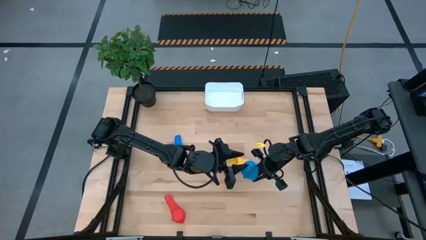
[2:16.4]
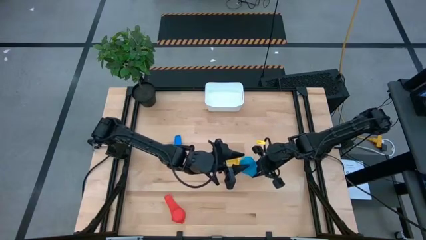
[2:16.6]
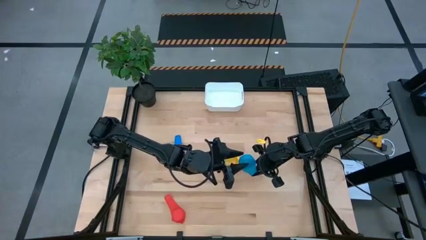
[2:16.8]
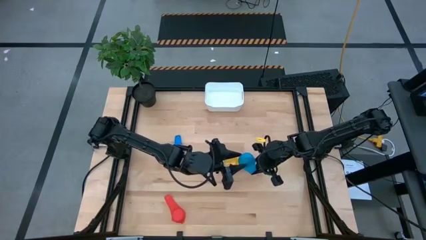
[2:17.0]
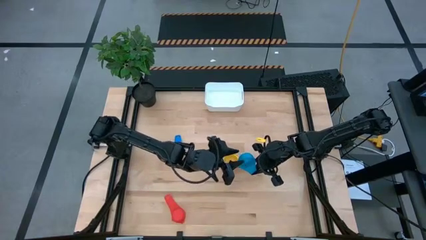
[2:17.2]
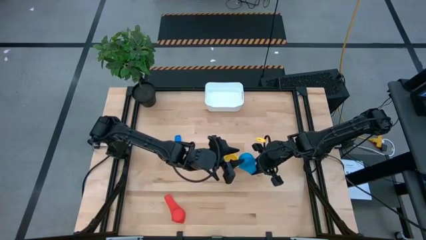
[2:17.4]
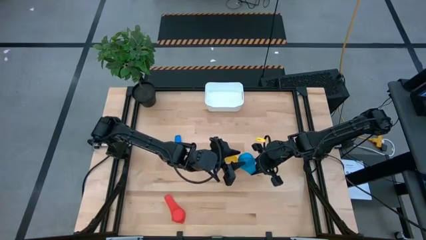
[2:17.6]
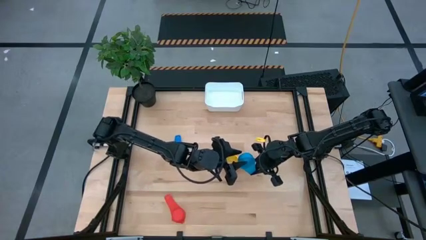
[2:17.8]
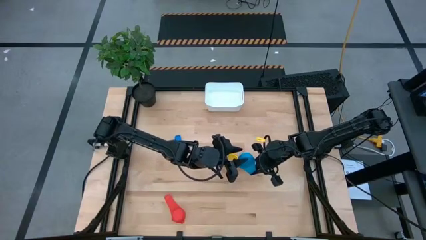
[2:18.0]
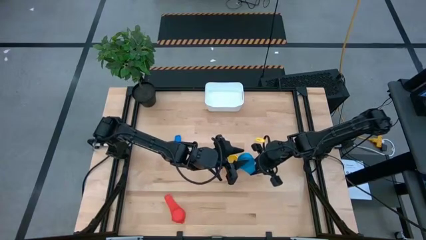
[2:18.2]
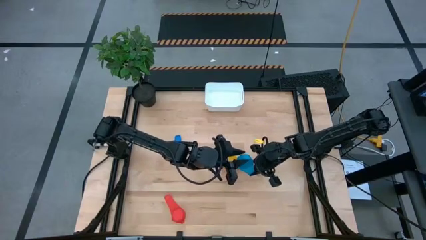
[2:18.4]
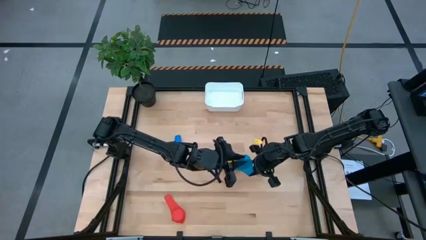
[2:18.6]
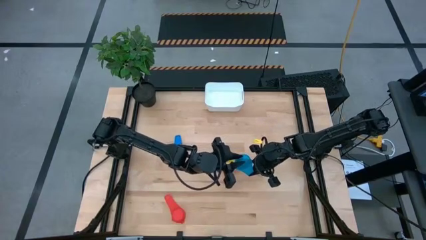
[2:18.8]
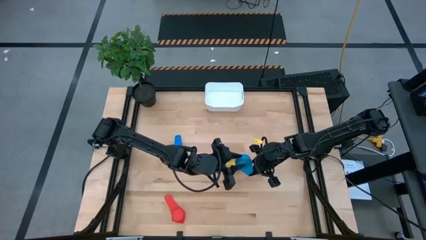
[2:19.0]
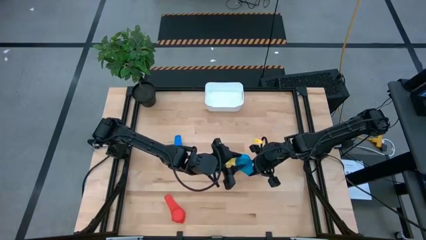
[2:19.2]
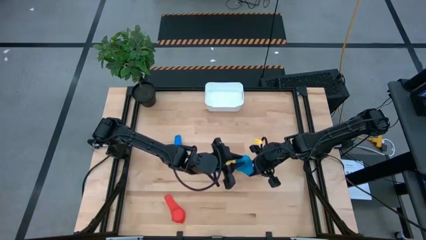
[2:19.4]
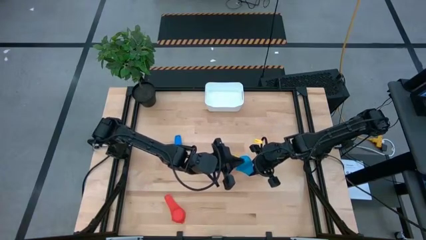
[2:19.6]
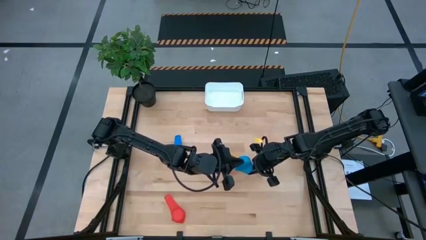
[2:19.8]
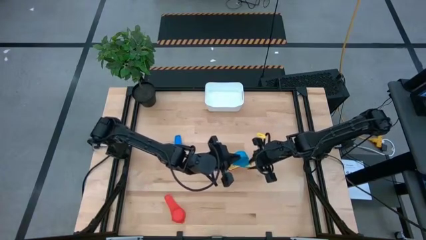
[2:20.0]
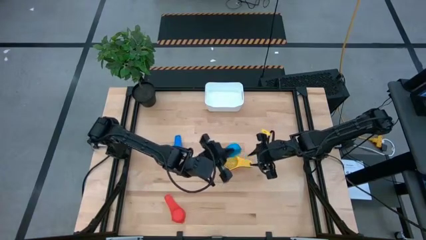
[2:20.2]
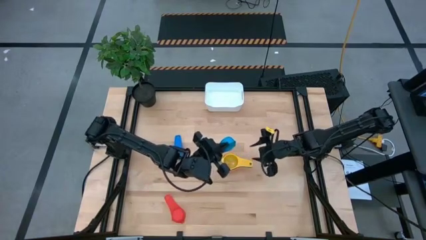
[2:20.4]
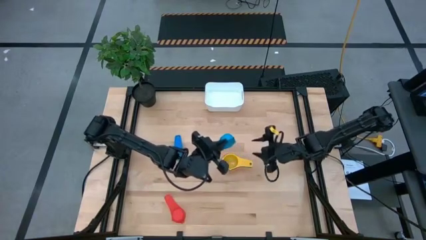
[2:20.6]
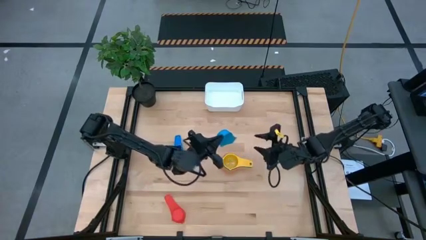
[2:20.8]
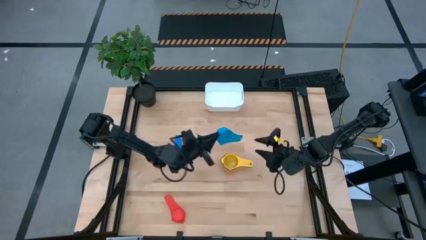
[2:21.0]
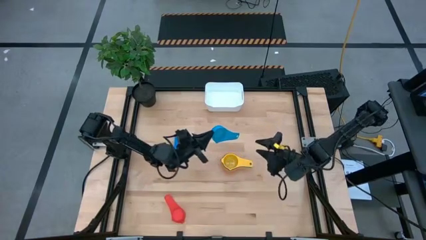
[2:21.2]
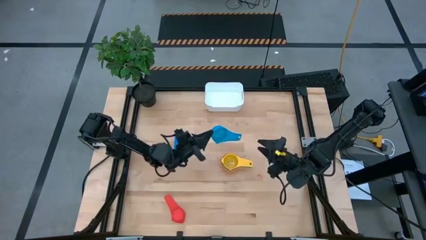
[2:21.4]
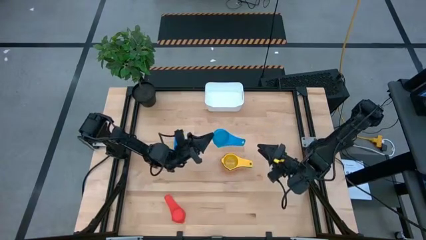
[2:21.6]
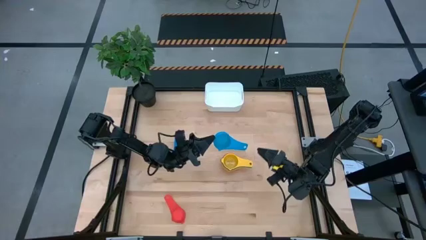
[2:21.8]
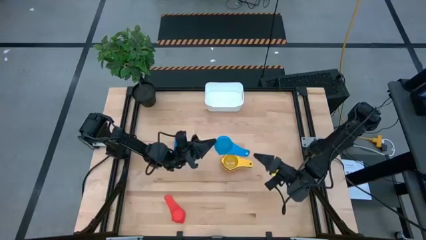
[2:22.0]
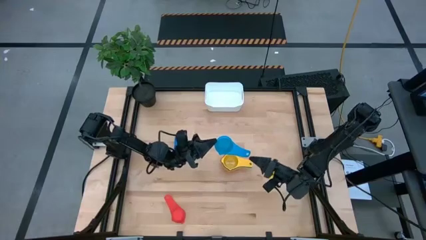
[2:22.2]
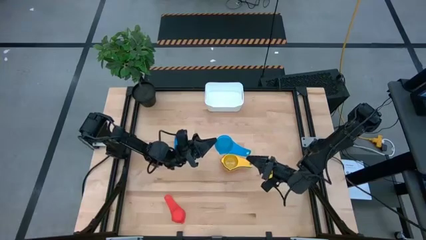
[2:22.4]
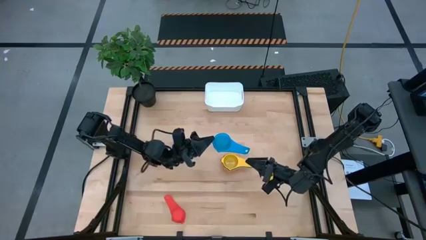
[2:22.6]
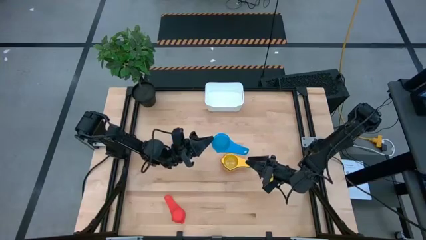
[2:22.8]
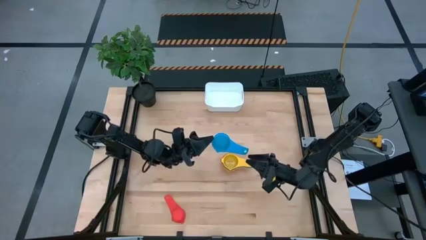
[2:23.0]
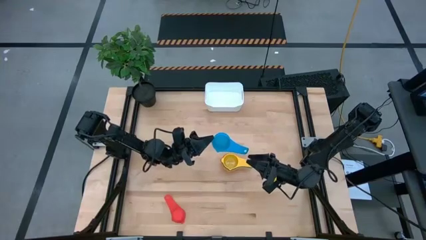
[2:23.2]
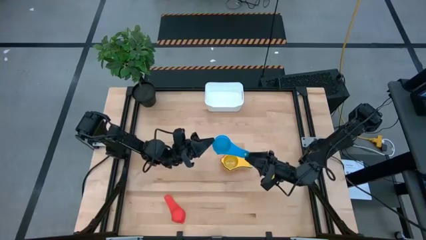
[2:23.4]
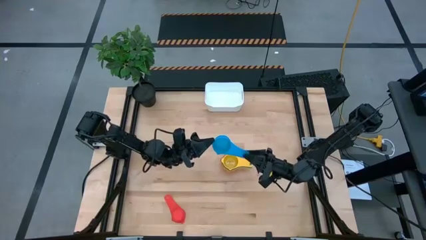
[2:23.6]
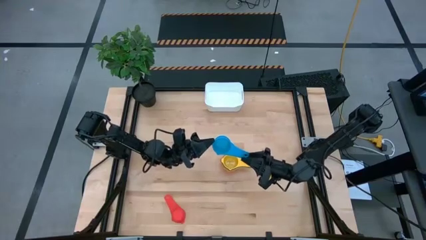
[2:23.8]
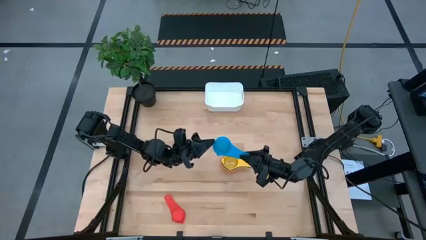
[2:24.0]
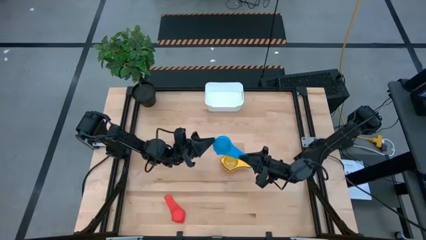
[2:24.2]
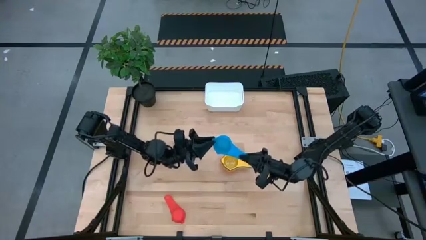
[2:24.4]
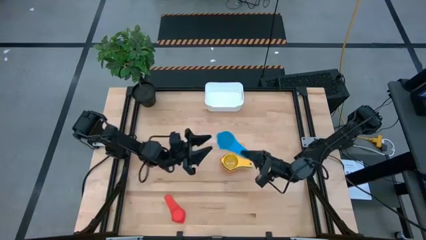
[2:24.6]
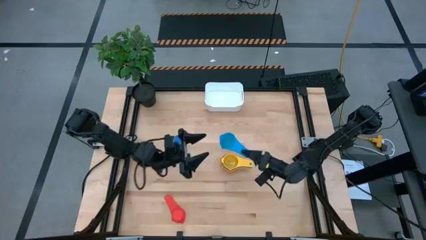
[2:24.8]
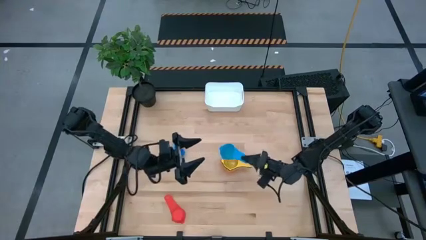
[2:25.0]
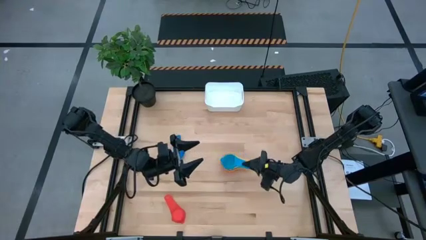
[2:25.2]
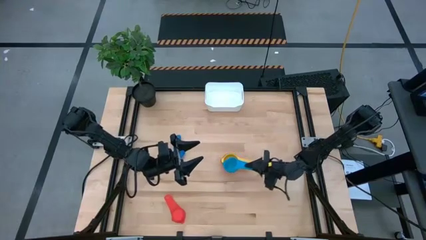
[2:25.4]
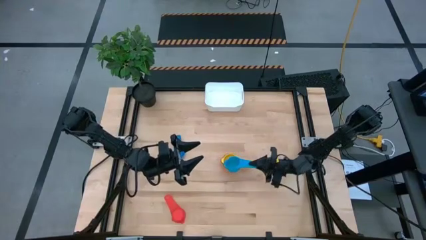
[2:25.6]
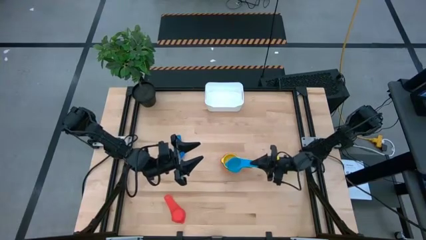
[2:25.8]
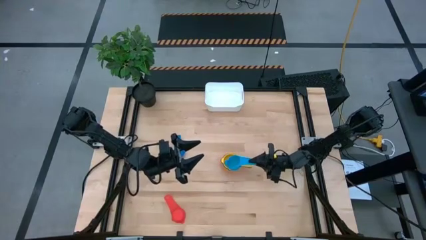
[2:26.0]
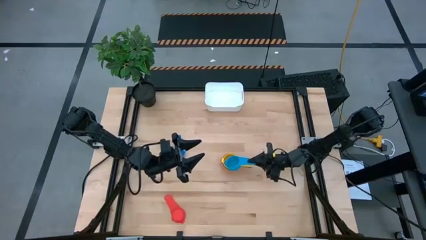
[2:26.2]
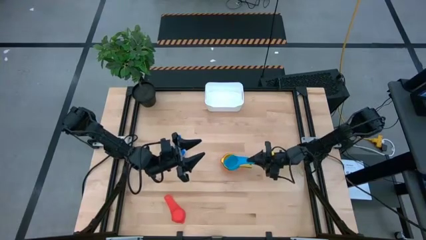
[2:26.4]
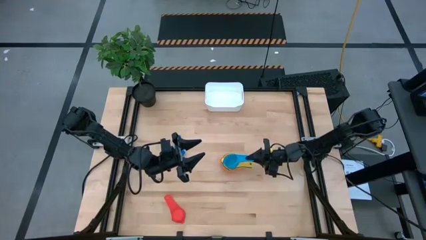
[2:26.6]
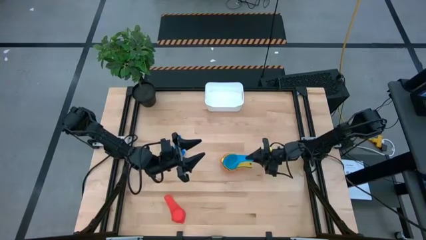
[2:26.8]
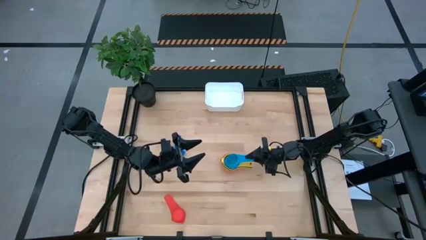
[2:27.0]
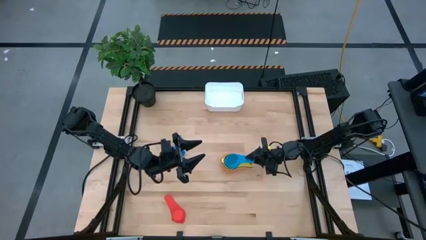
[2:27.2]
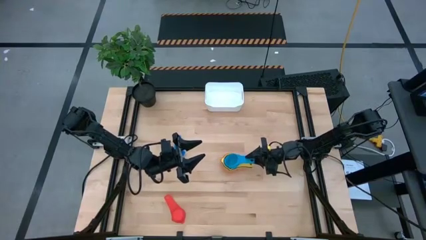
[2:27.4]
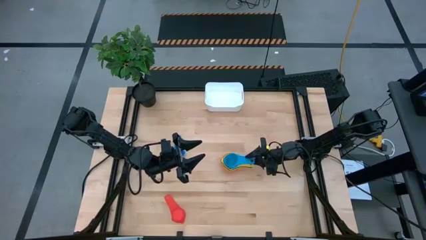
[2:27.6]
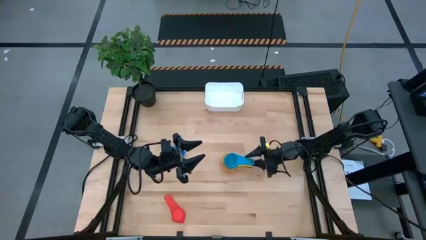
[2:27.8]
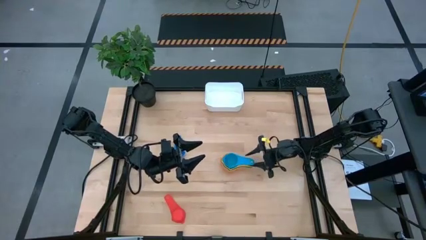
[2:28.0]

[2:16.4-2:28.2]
Task: Nest measuring cups in basket
Stack the light blue measuring cup on top of the yellow measuring cup

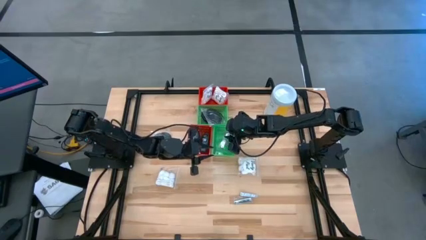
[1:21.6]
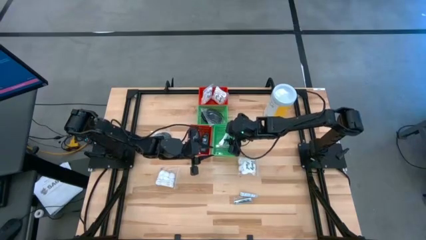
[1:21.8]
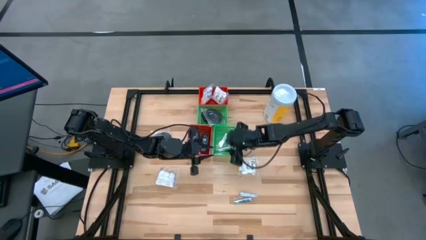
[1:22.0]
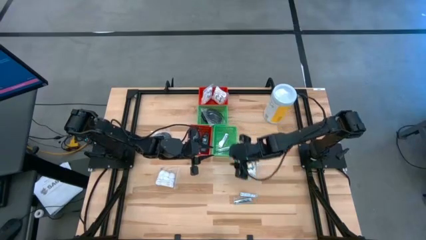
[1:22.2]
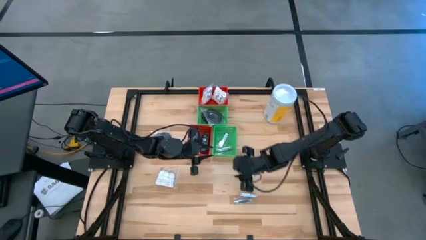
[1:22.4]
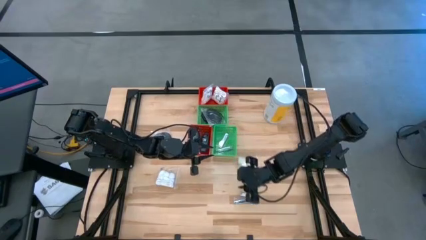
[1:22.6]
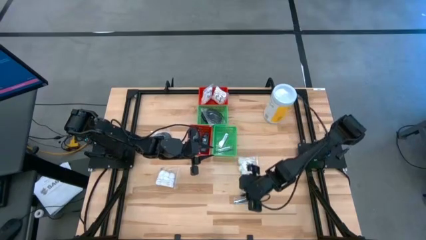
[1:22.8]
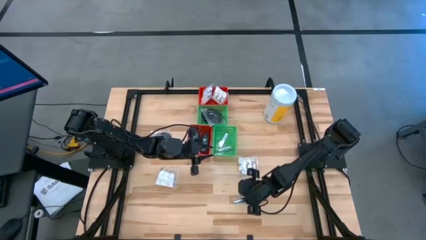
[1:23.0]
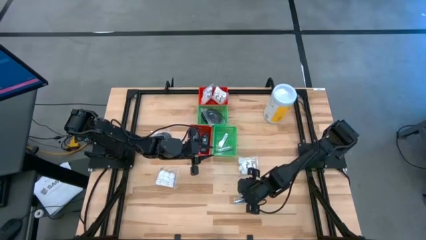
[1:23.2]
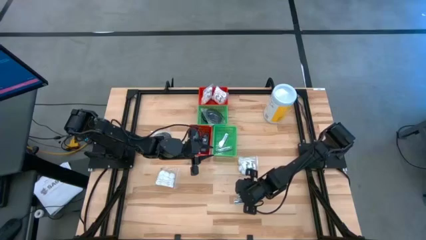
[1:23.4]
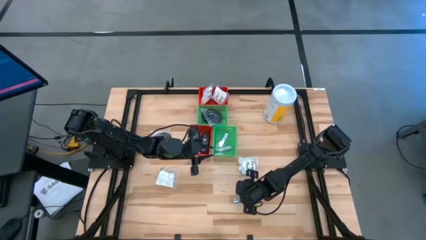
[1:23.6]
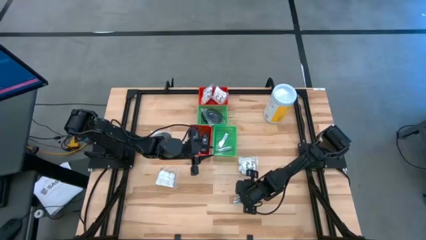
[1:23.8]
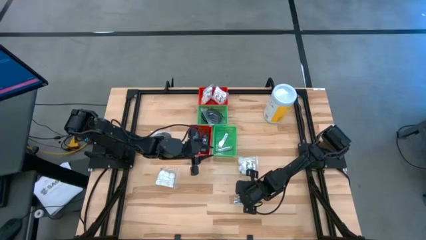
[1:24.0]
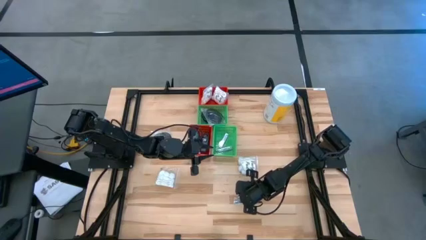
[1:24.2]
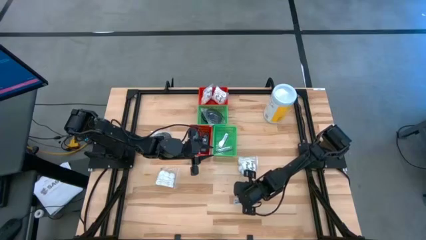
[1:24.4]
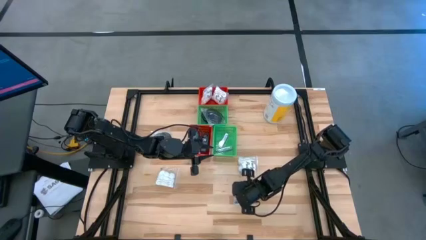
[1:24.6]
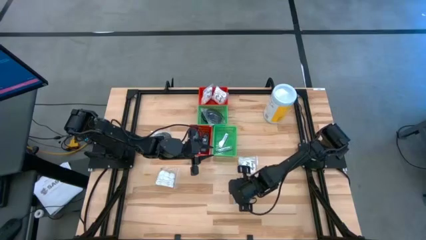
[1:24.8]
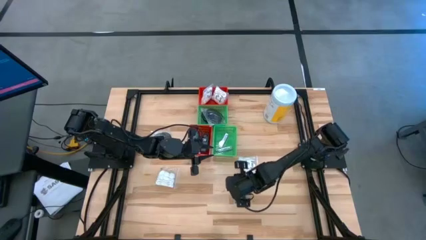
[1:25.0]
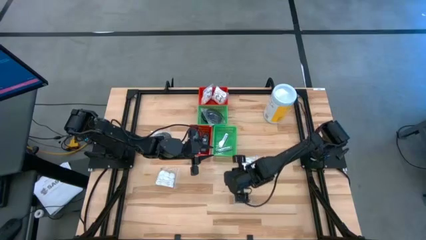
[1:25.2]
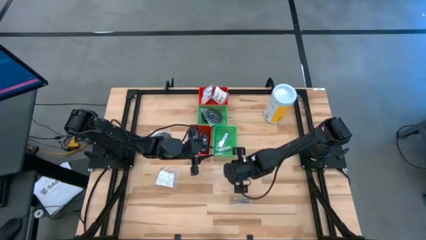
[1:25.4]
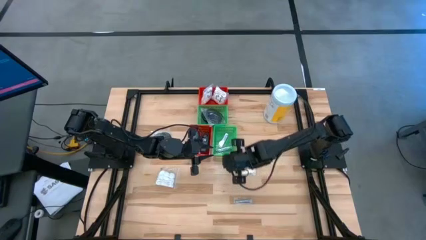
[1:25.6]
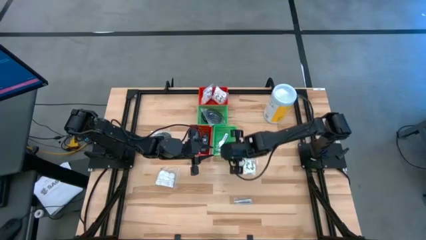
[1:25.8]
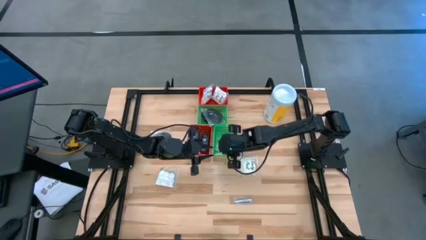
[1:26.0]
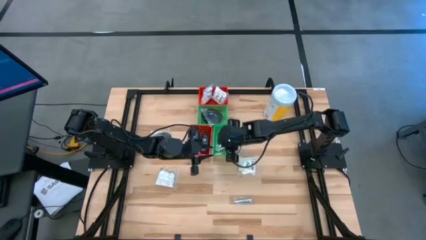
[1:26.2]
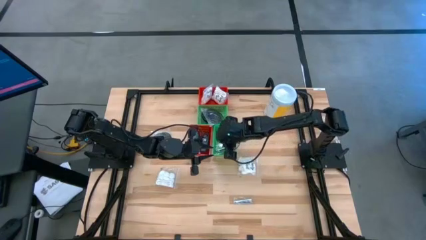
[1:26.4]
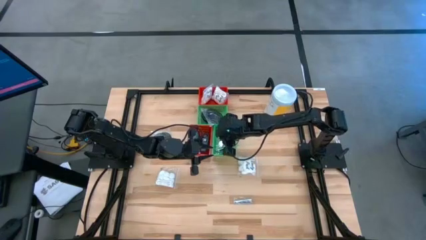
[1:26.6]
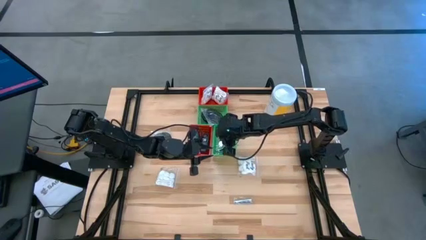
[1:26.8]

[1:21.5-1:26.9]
Task: Pick & Place Travel size toiletries
Put the silver nail cutter into the bottom green bin
